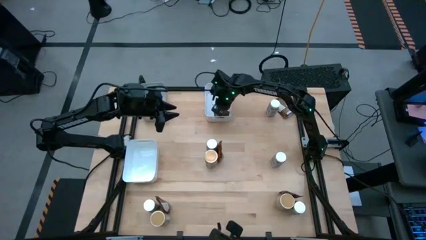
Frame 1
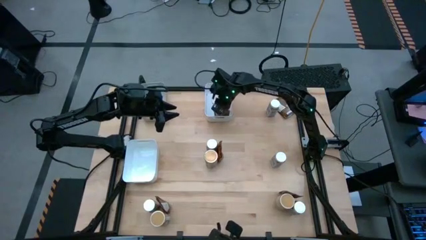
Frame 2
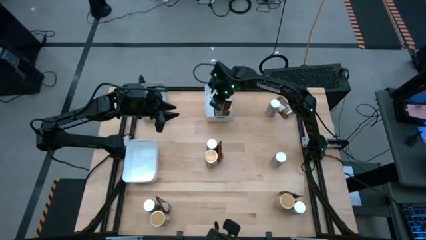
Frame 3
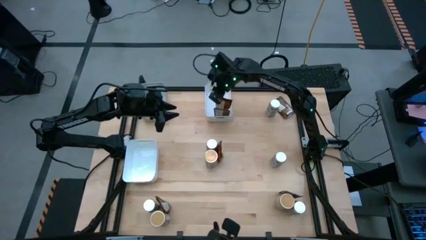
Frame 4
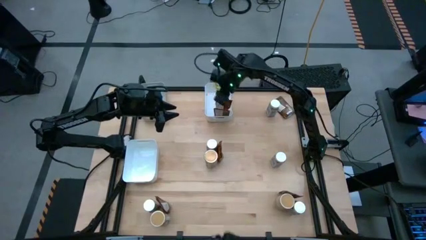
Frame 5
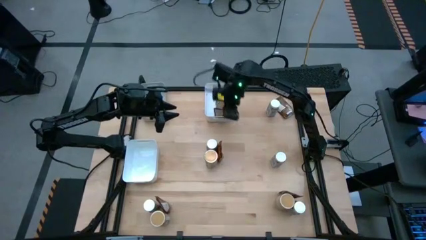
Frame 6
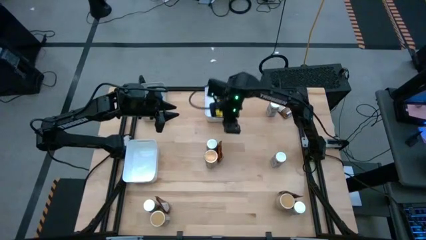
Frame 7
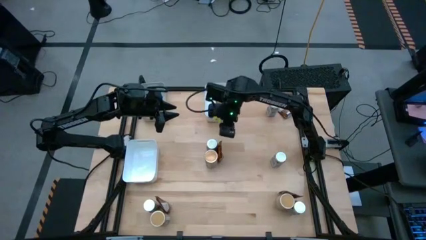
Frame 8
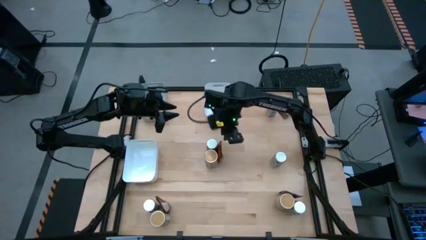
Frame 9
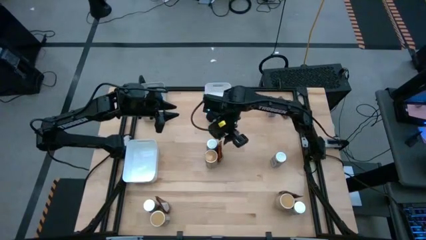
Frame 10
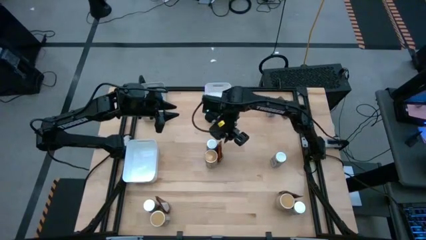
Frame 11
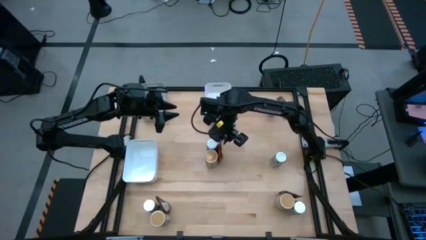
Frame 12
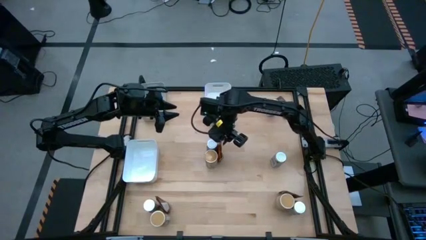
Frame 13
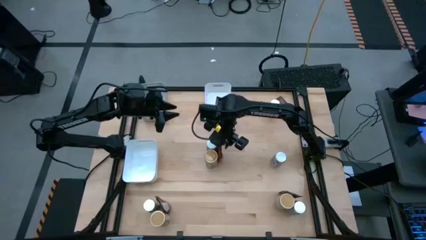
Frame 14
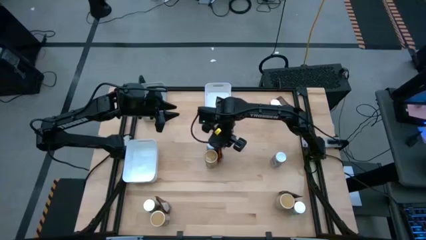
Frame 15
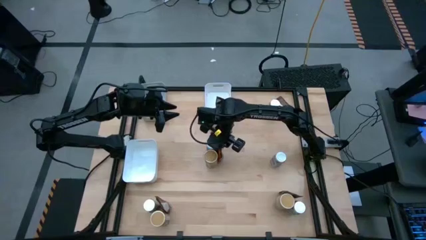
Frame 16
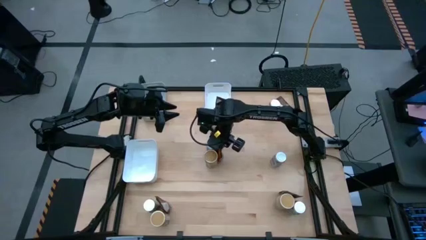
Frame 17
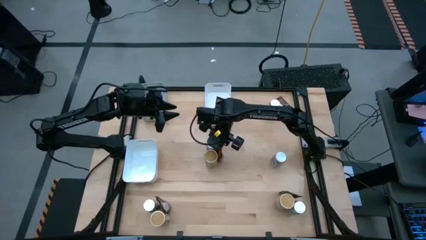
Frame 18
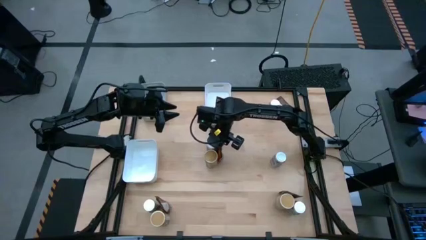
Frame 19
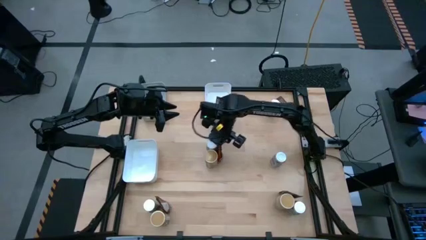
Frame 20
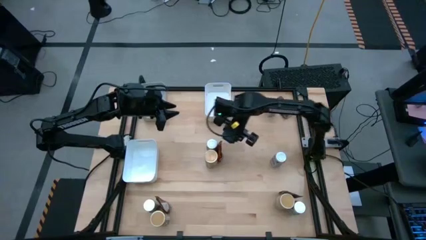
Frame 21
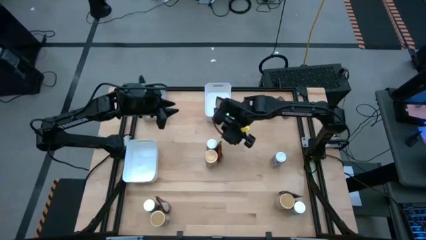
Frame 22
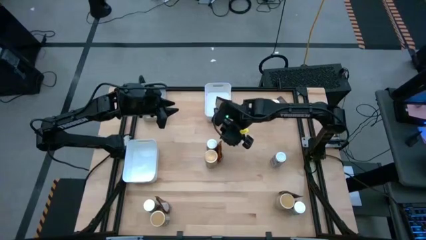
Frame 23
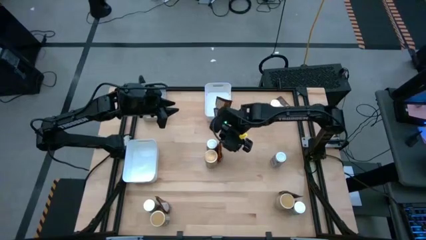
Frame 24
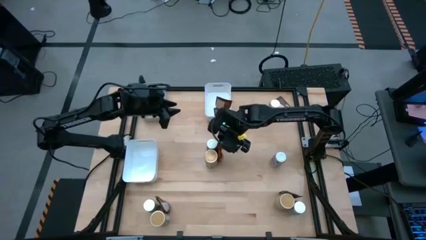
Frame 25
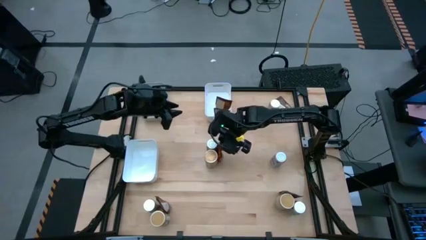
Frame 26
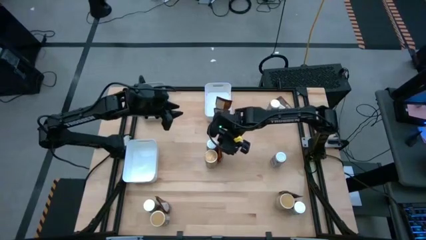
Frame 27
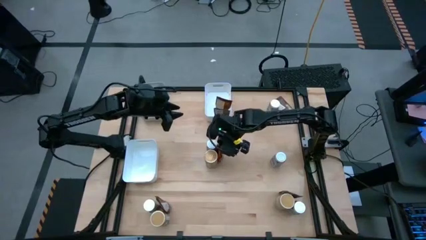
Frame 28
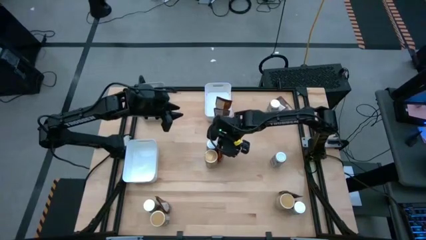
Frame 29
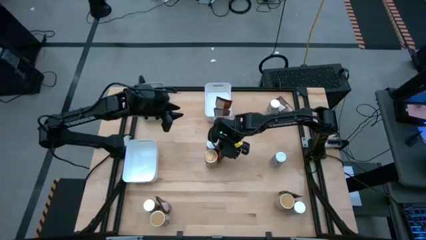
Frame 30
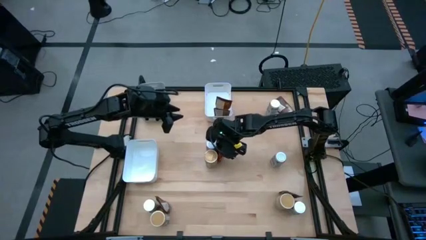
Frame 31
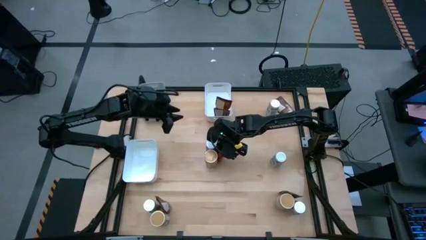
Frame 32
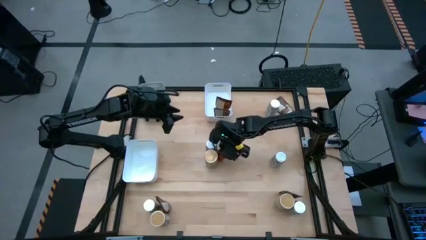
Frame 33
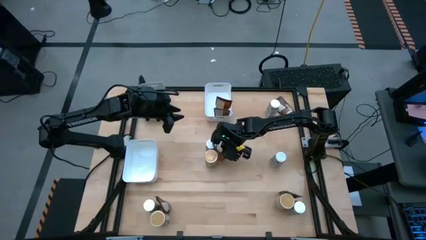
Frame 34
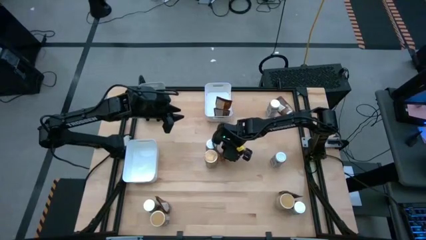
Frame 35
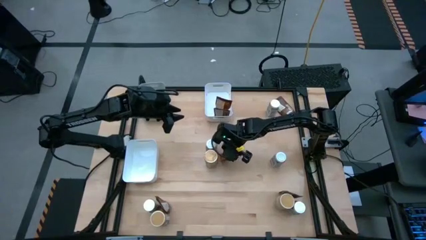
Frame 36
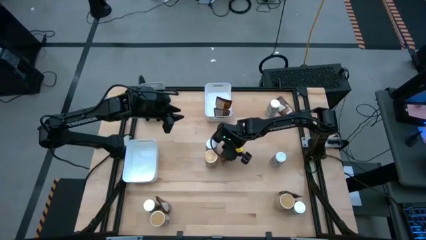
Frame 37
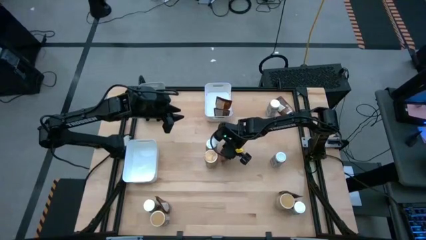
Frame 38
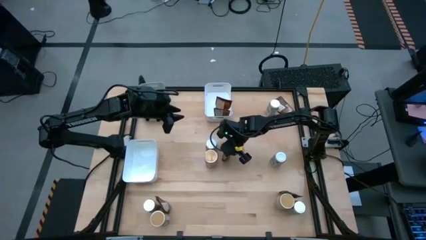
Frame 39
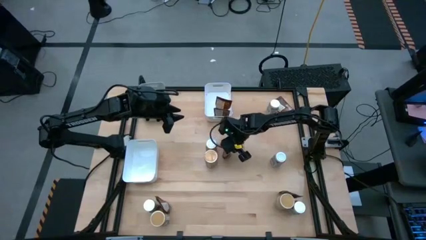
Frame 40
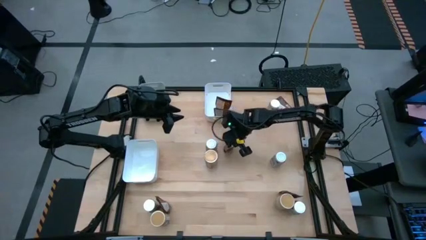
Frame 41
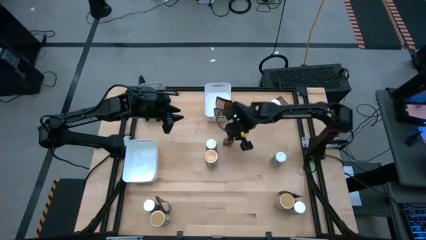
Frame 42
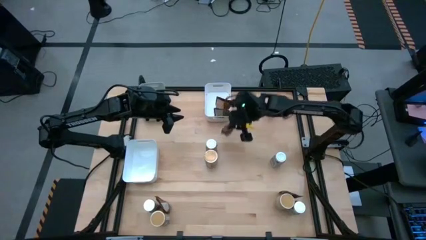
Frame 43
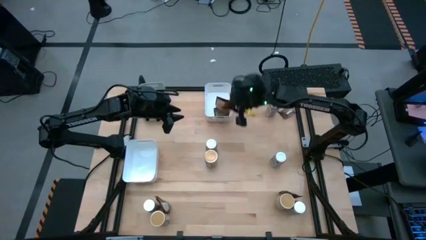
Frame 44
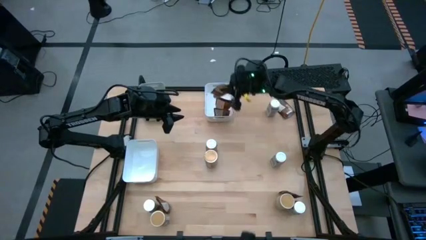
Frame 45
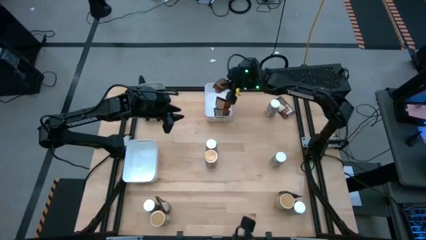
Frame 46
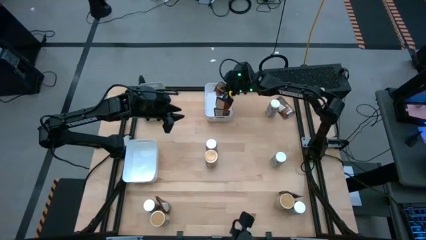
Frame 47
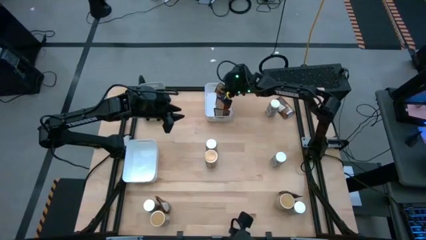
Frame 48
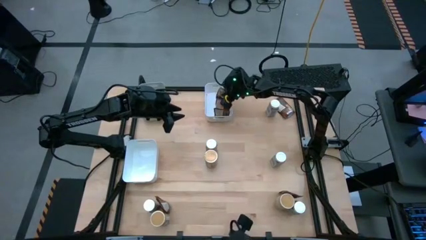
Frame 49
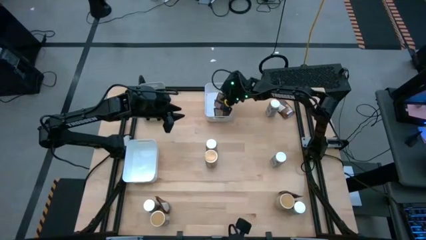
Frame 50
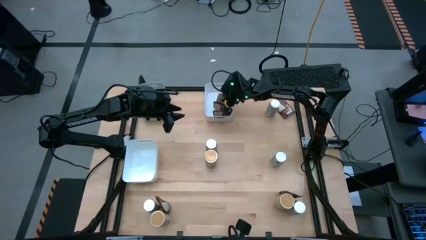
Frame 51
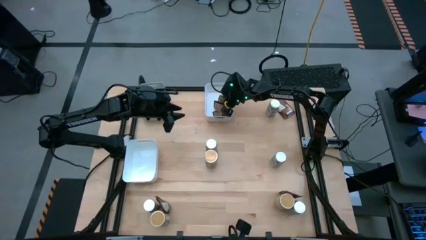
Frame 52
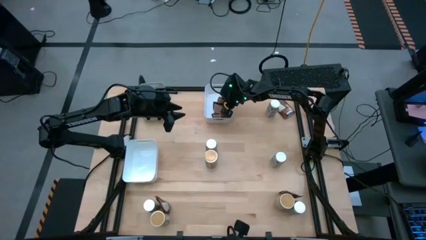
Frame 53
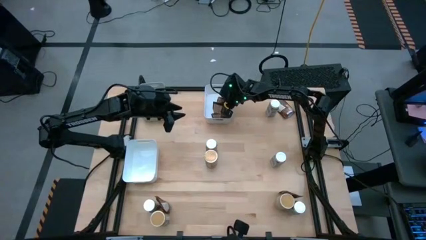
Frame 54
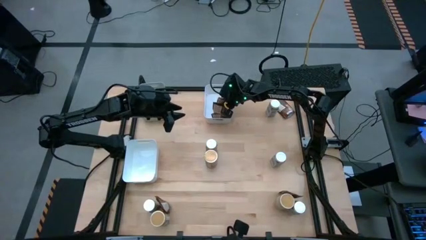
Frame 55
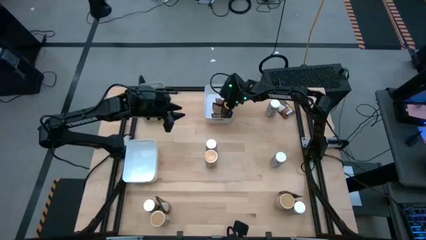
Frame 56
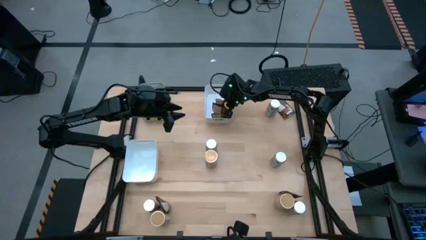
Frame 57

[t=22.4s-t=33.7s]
Task: Sort spices by type
Put the brown seasoning pack into the top white bin

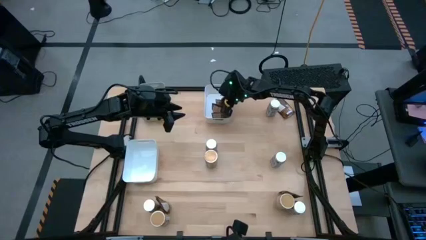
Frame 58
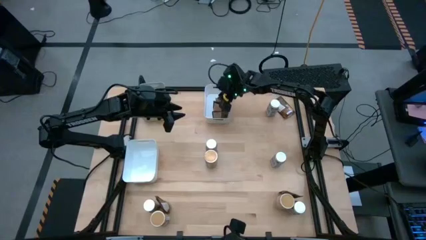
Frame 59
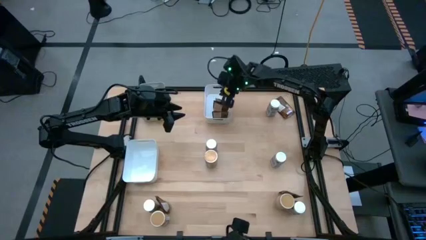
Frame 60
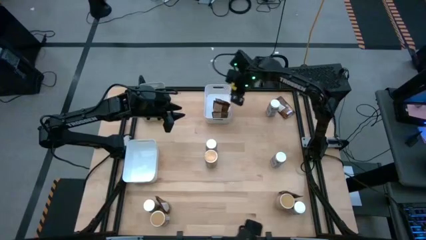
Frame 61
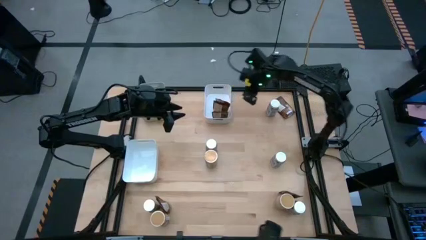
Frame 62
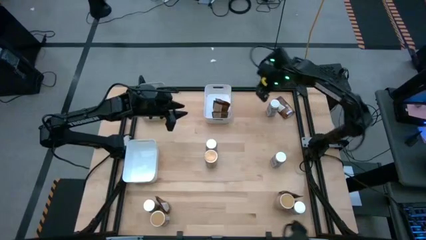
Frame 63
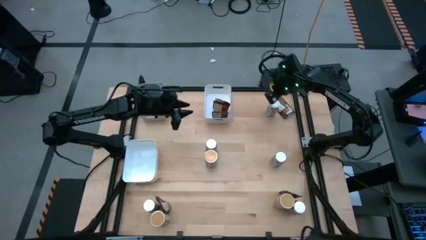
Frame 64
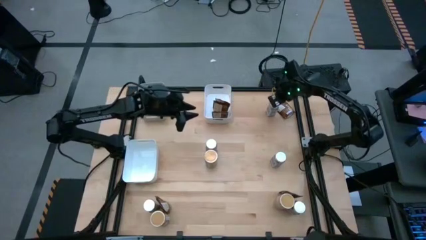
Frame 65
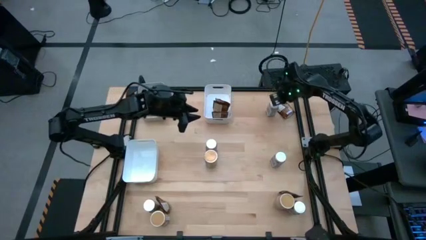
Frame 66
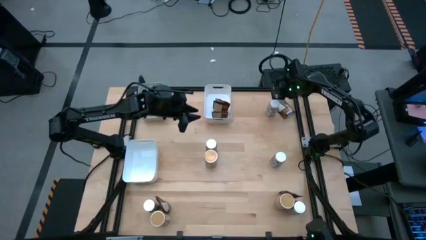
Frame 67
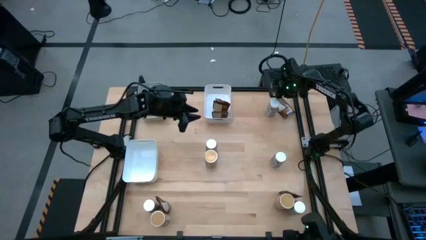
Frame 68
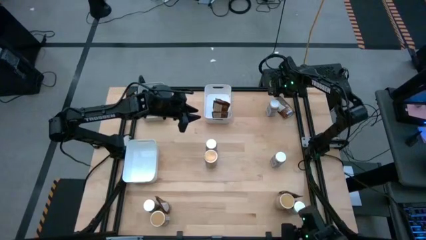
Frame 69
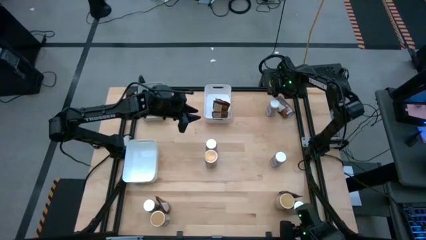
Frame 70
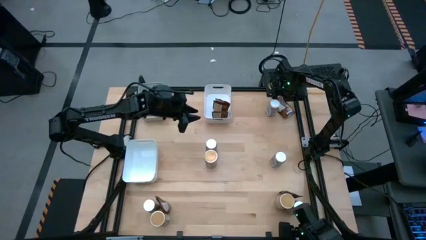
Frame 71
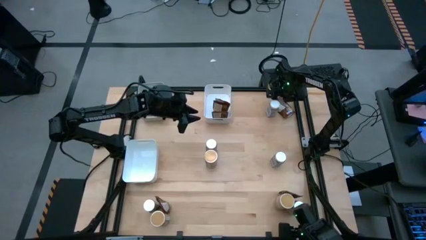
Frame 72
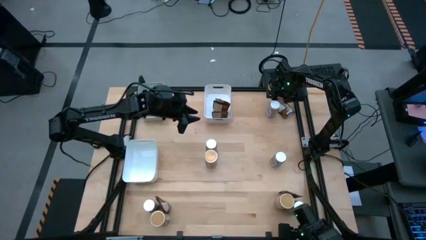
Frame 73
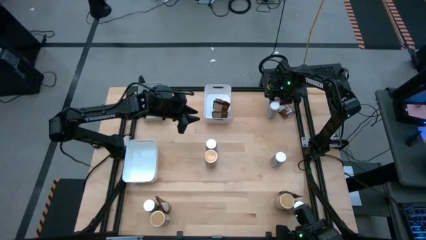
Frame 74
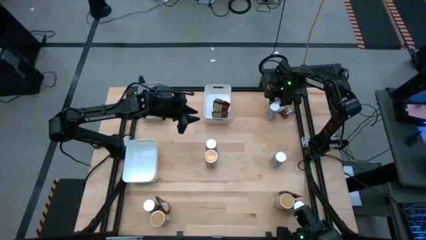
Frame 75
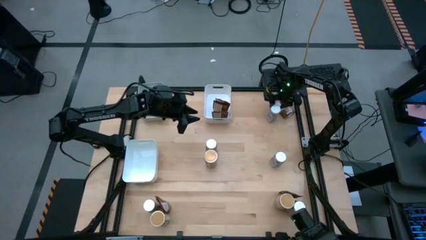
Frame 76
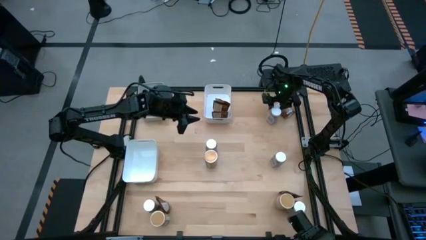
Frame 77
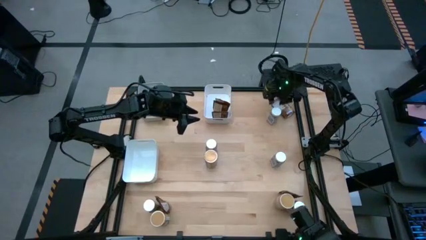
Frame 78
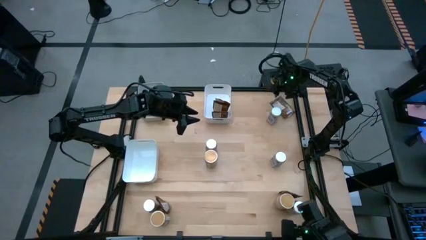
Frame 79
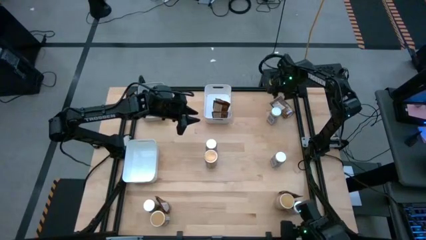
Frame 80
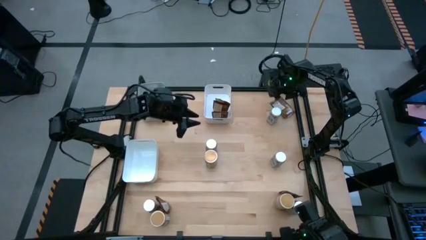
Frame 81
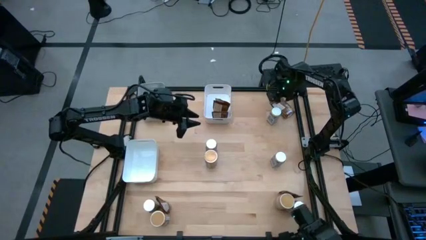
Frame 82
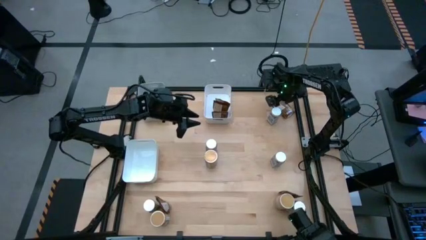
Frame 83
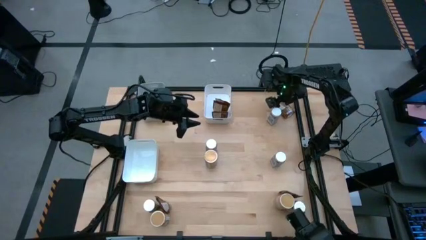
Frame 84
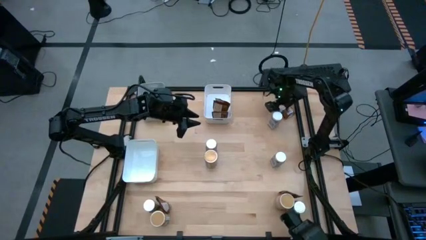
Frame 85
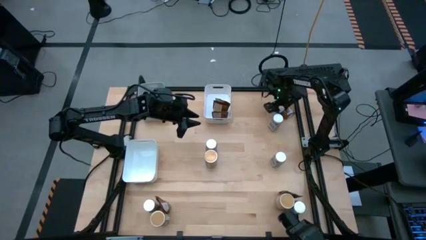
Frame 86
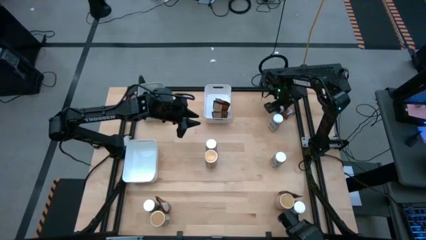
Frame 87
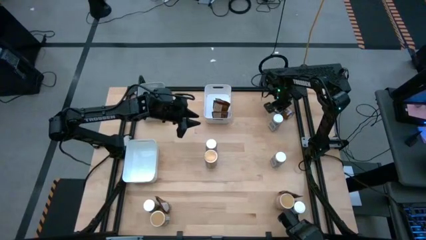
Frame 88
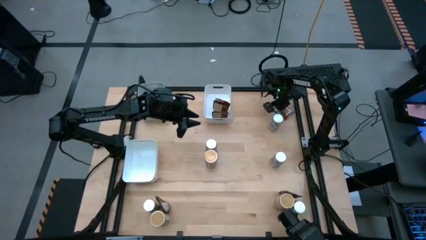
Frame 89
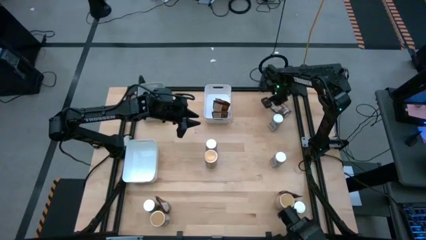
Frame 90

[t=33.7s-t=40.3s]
Put the brown seasoning pack into the top white bin
